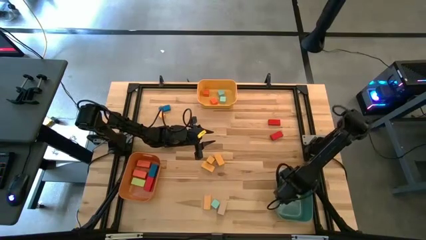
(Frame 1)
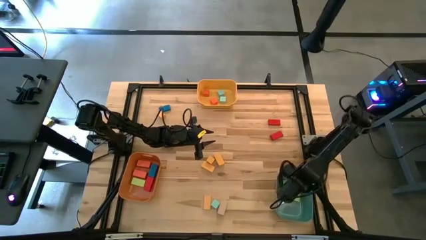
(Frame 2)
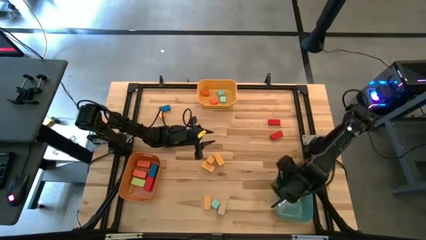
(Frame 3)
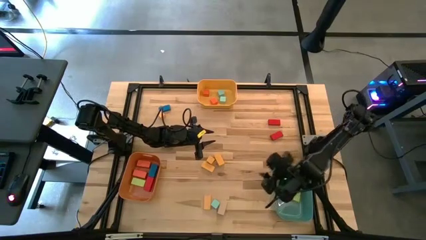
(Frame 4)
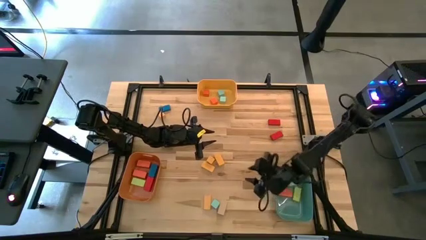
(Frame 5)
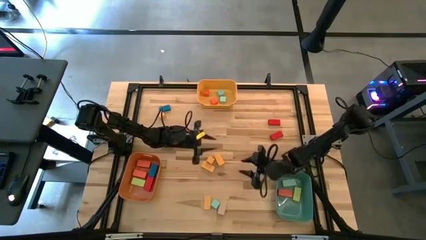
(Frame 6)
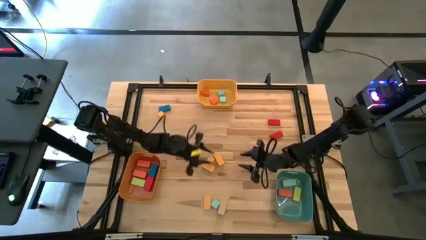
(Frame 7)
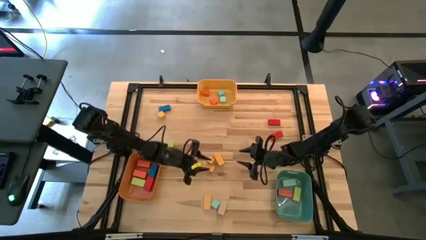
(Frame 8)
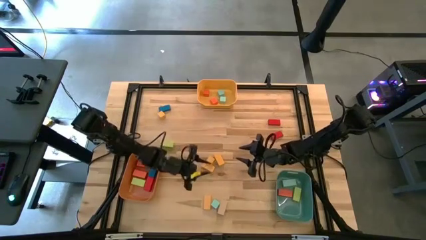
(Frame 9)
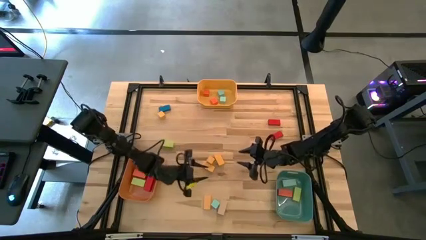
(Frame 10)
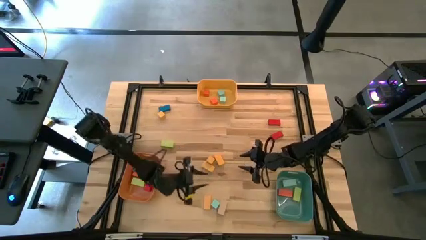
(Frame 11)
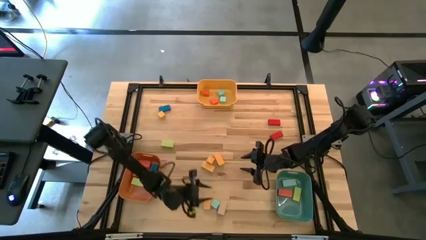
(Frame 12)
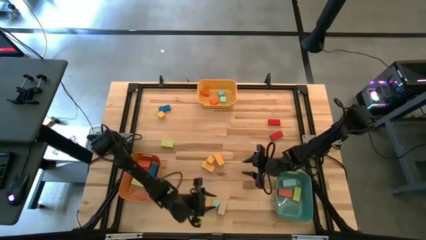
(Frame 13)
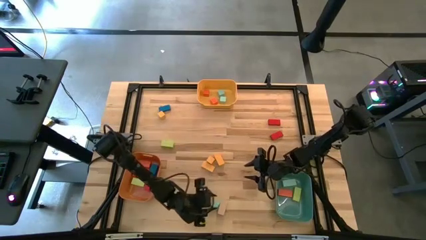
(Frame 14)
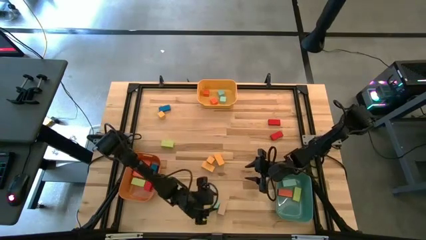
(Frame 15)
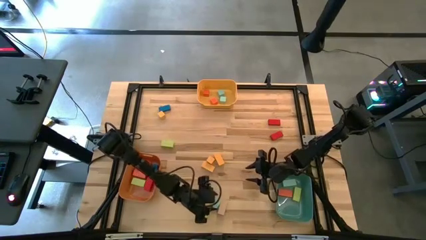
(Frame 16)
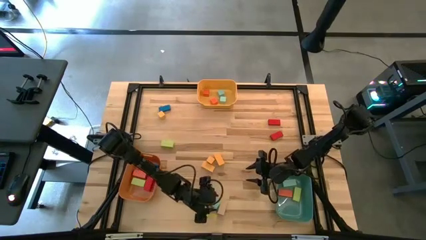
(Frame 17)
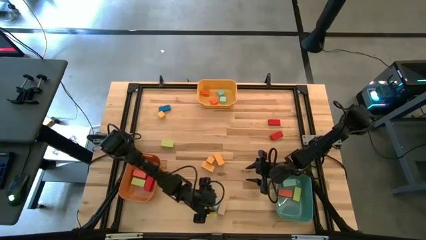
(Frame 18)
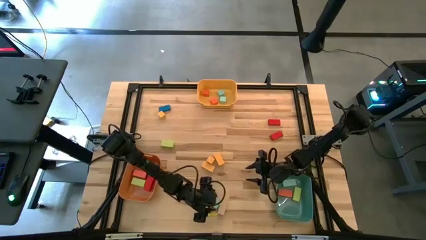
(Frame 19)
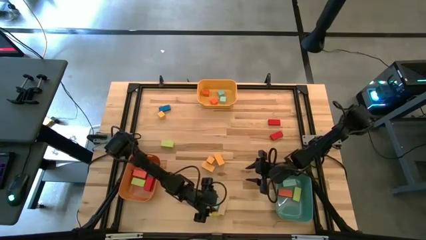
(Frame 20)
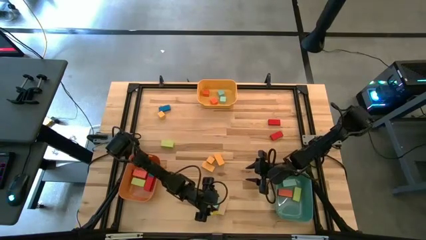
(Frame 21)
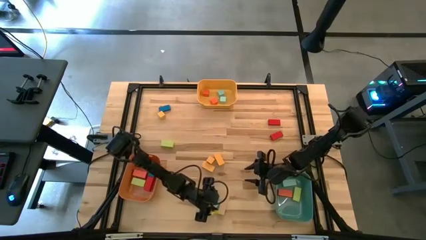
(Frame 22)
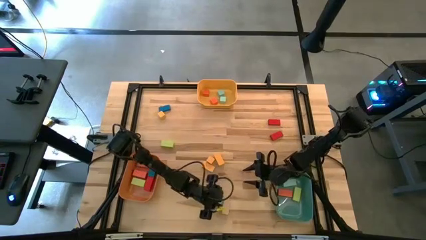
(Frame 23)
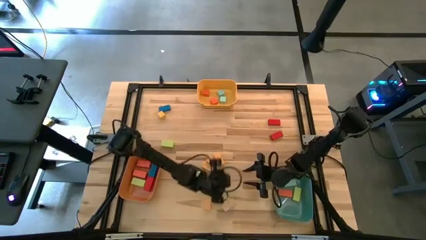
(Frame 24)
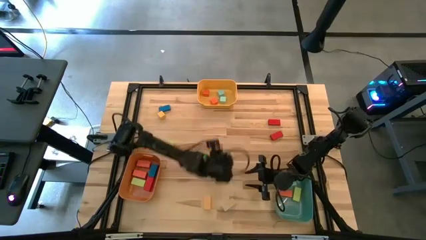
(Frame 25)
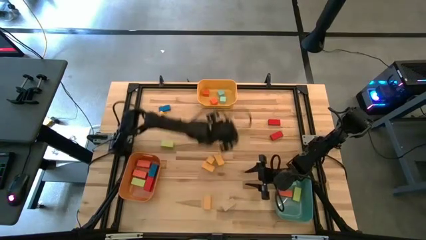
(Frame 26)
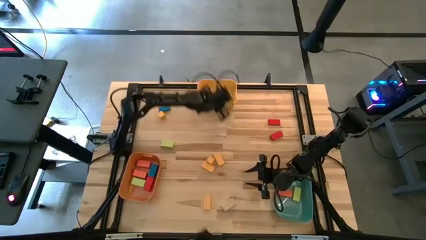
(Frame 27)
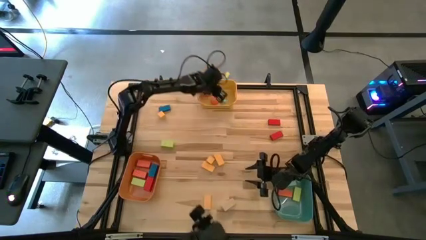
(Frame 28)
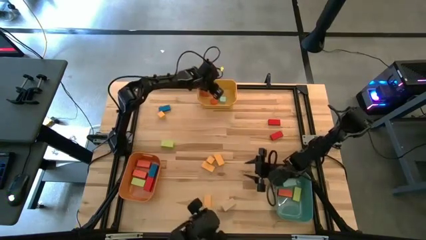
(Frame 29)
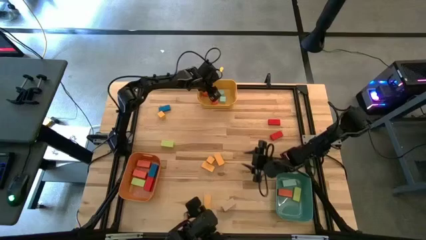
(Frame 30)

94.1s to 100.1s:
Task: Sort blocks by size
Put the small light blue block into the yellow bin

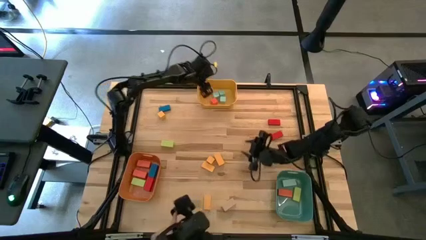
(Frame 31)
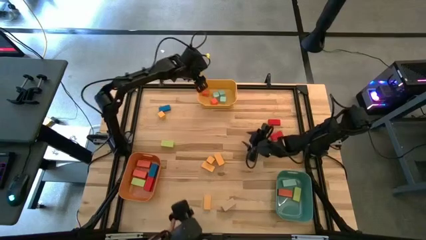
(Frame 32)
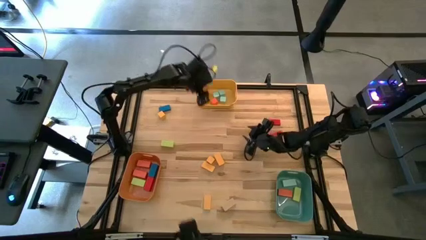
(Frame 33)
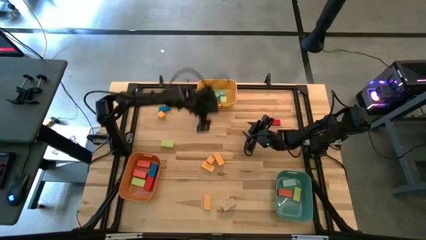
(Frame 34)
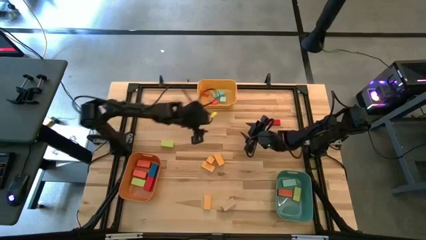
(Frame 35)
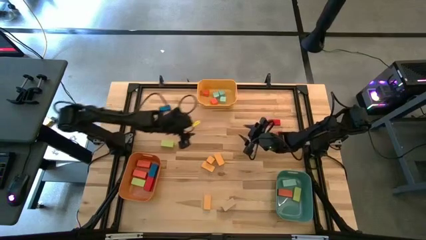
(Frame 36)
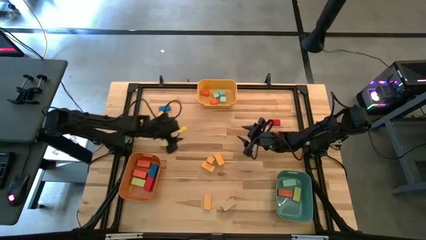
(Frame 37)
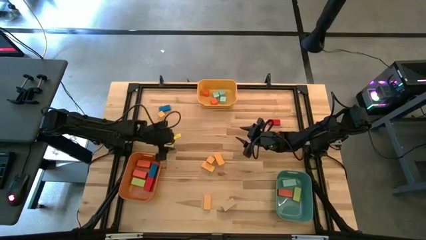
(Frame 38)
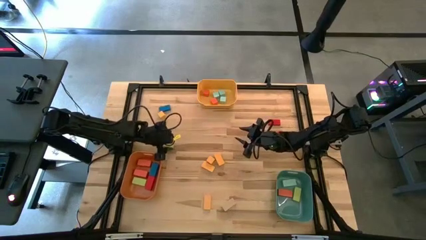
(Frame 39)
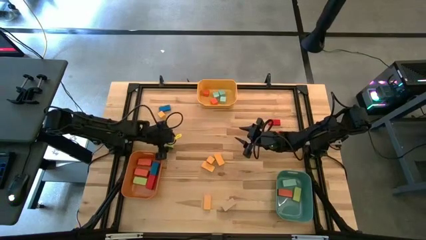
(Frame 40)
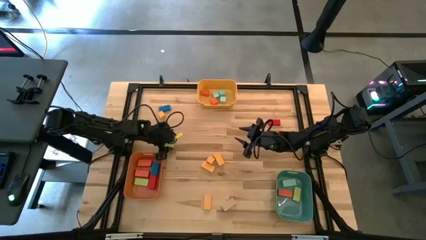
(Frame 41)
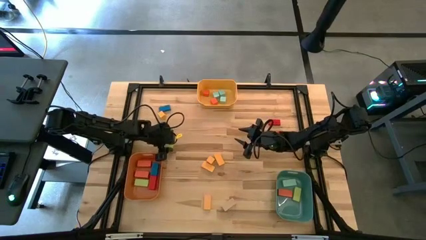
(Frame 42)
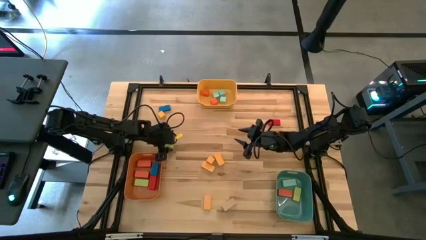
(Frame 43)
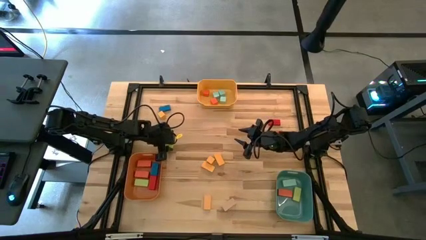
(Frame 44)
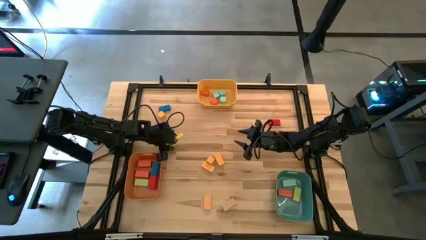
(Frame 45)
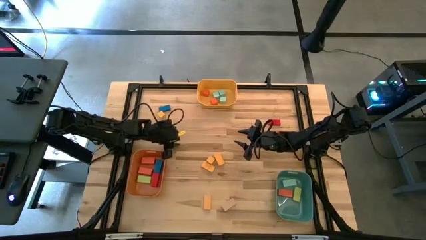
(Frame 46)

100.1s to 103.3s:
Put the thin light green block into the green bin

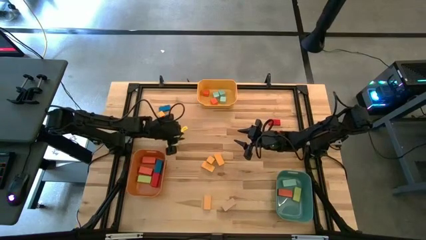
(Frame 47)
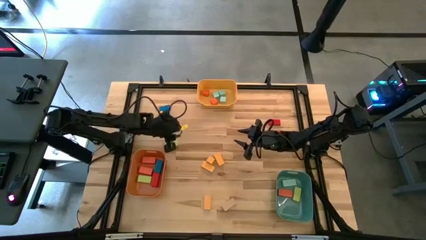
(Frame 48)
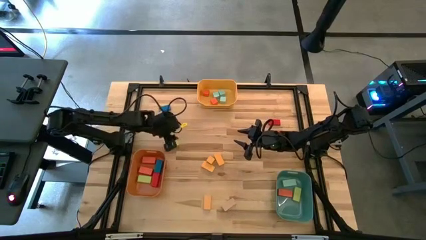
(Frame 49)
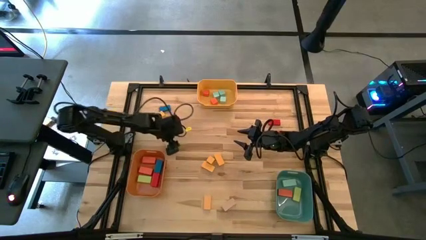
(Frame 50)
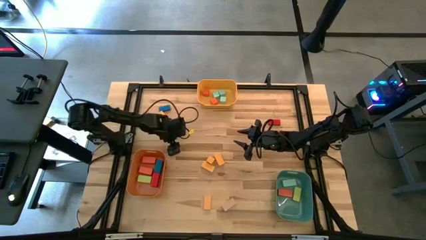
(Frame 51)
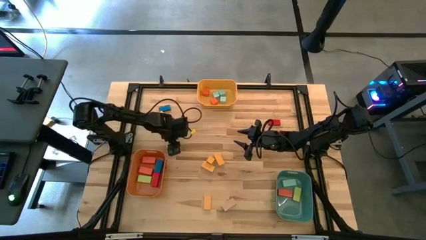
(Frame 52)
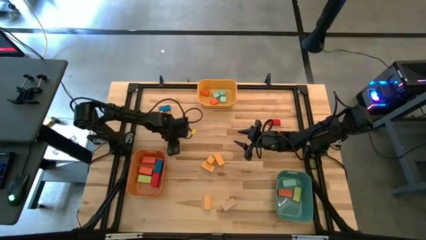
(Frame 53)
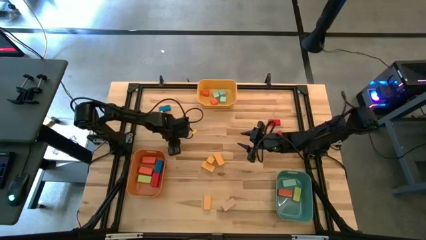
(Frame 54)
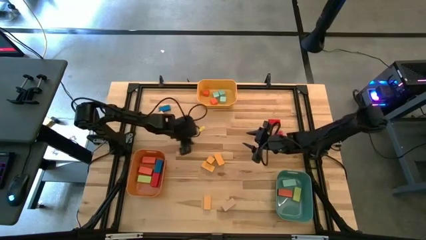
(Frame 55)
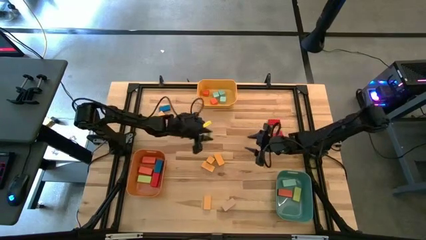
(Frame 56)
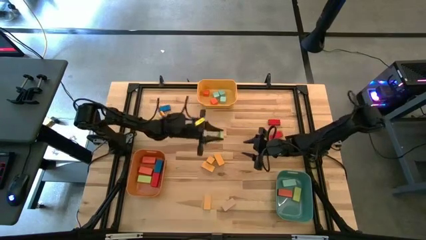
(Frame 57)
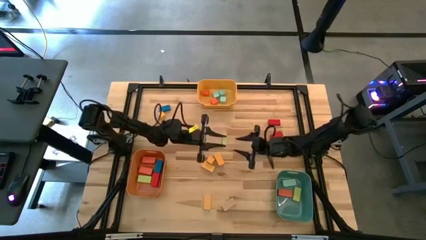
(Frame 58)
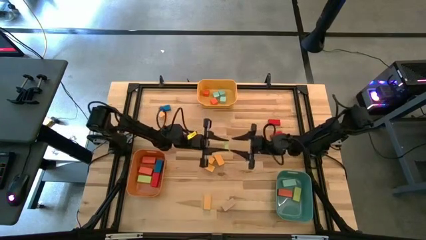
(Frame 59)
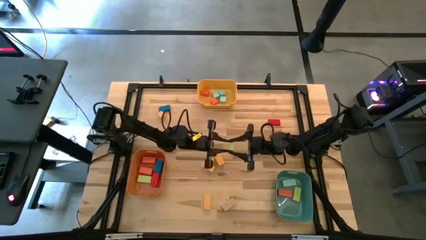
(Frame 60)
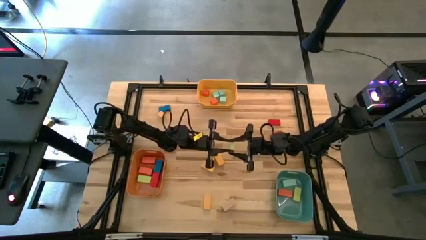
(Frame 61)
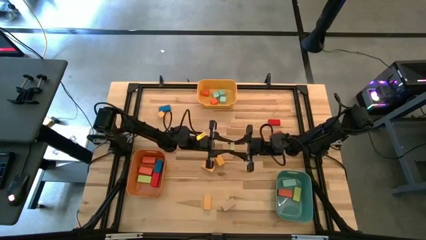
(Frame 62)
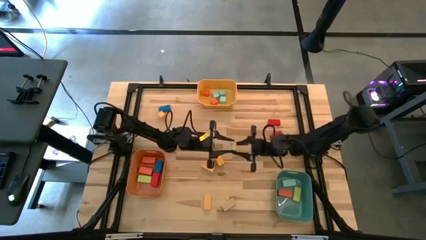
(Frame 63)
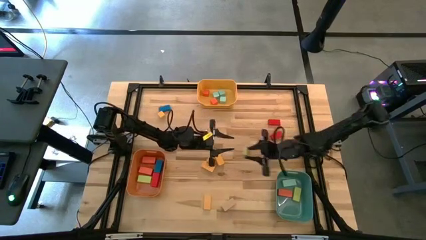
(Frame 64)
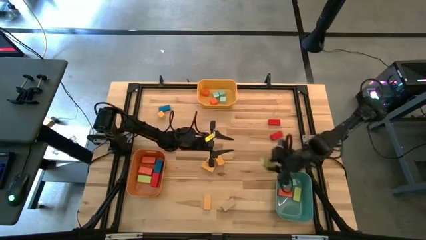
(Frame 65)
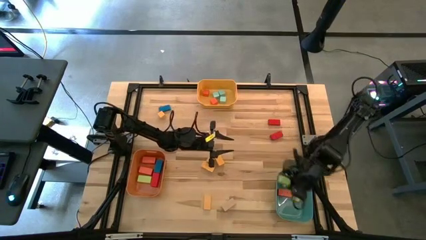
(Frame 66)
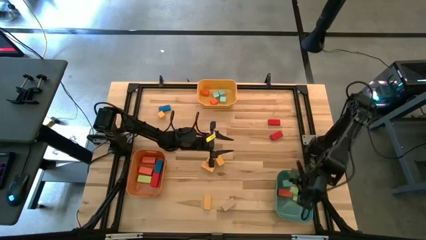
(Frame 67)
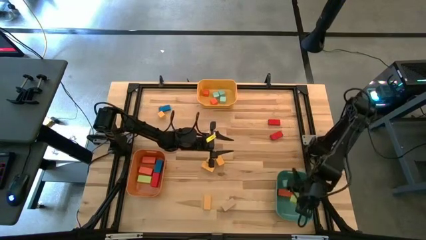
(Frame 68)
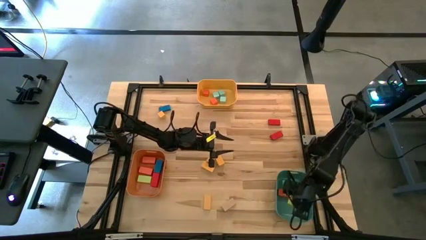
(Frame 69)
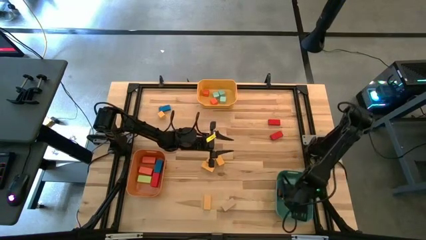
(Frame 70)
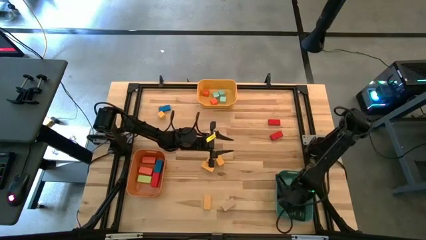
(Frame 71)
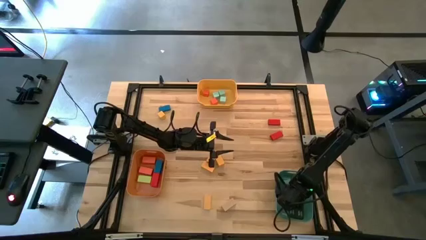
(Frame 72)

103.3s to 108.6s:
Put the thin light green block into the green bin

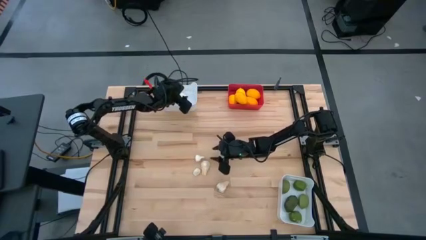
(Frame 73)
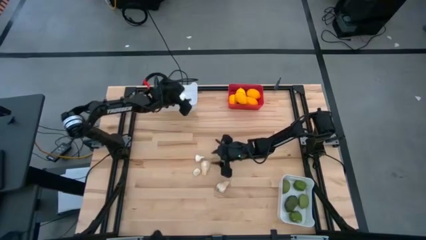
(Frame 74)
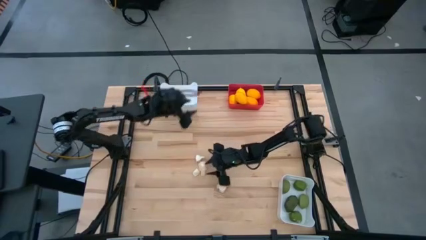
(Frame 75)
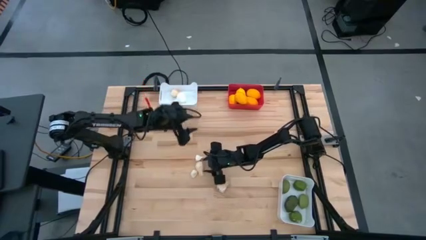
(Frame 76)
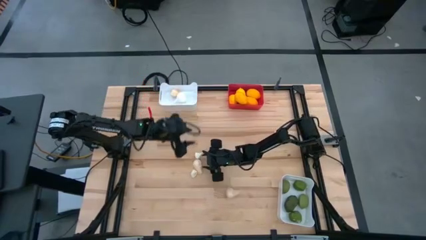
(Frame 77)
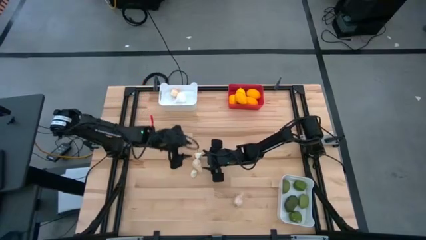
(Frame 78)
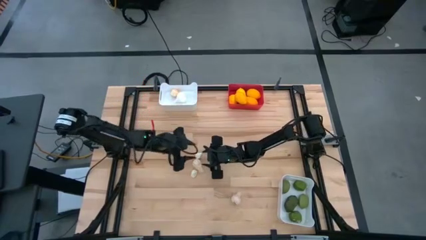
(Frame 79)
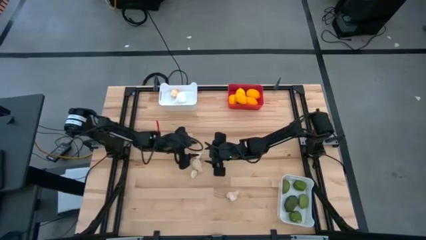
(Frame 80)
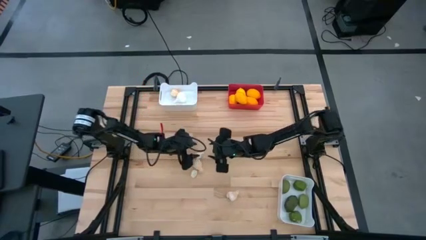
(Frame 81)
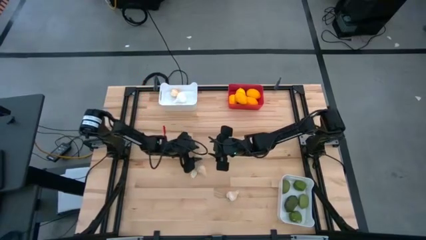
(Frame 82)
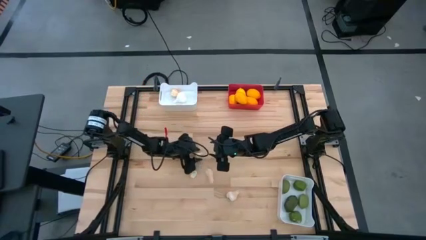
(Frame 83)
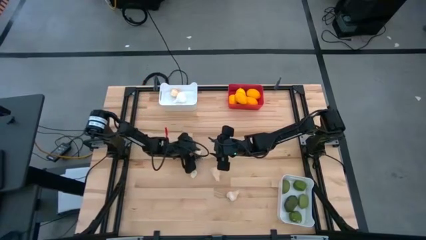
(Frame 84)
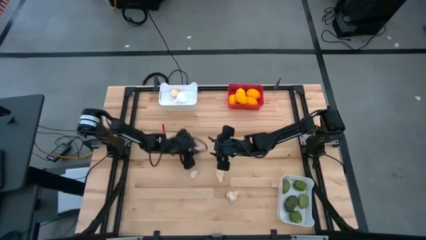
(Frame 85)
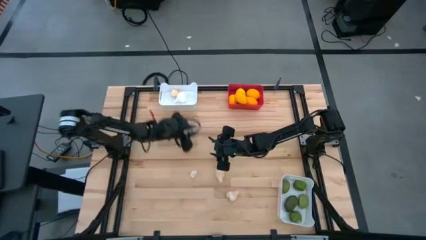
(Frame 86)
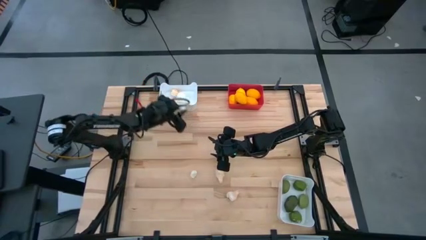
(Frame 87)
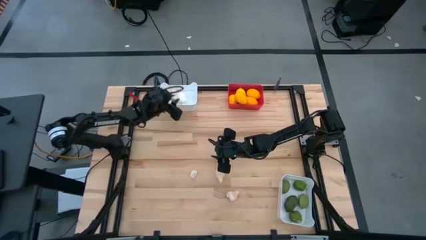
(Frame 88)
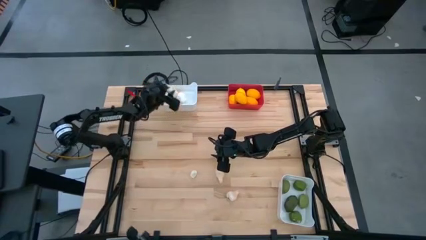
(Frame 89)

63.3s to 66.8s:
Task: Sort produce into baskets
Put the white garlic into the top white bin
